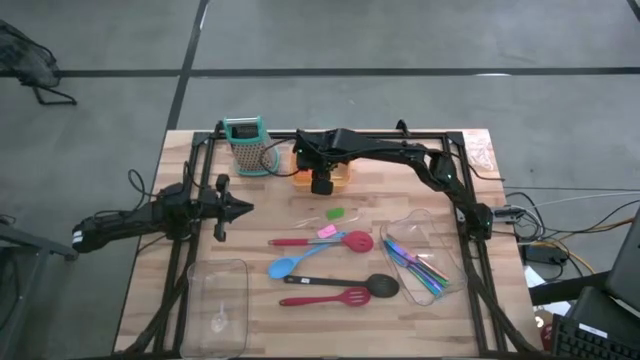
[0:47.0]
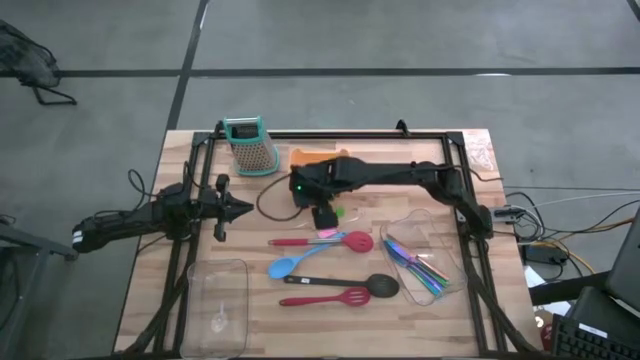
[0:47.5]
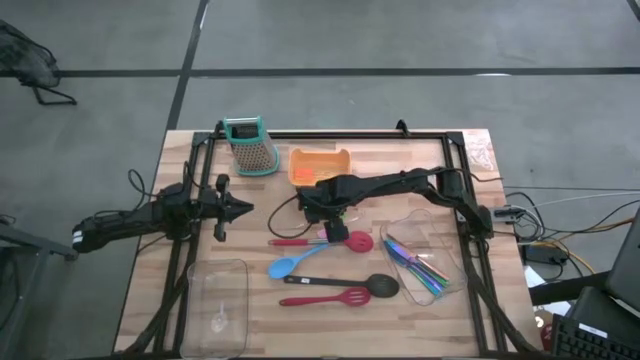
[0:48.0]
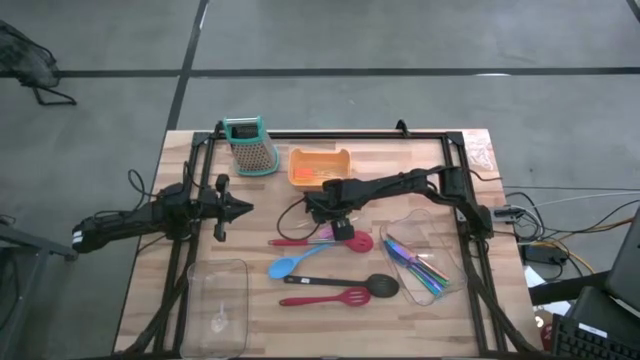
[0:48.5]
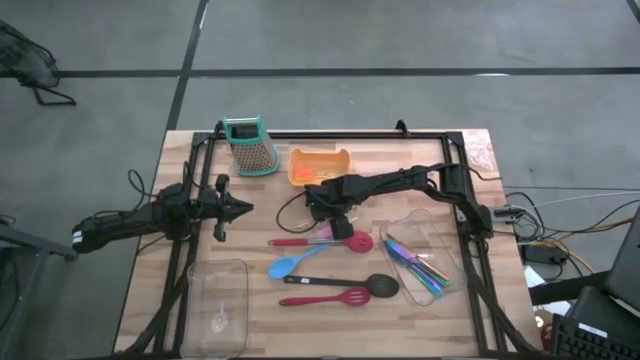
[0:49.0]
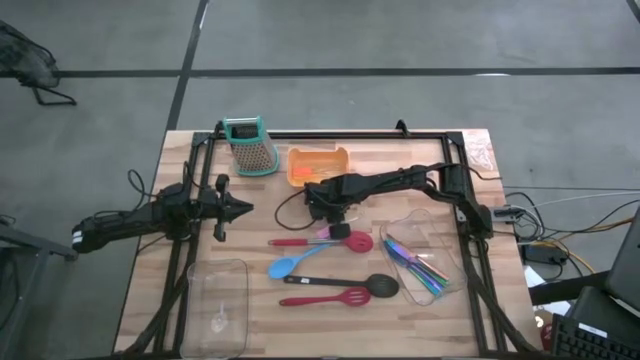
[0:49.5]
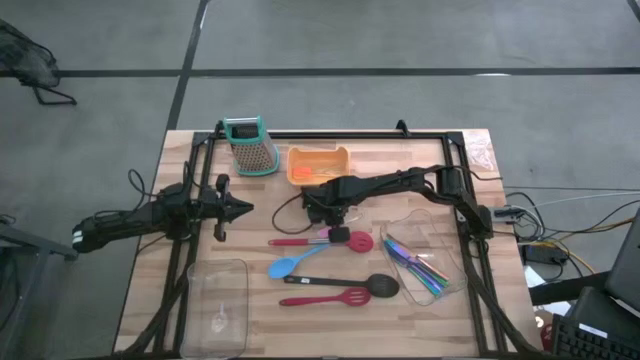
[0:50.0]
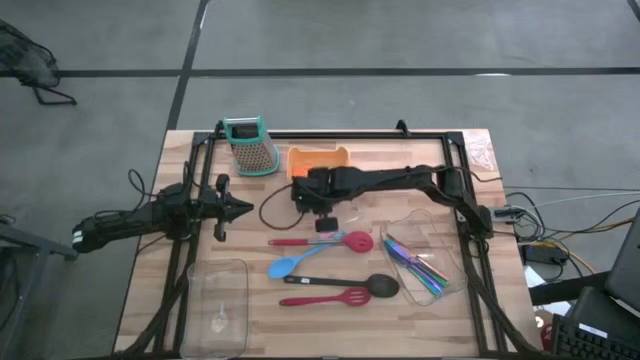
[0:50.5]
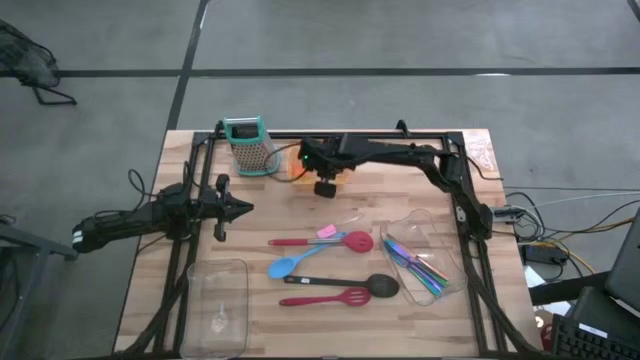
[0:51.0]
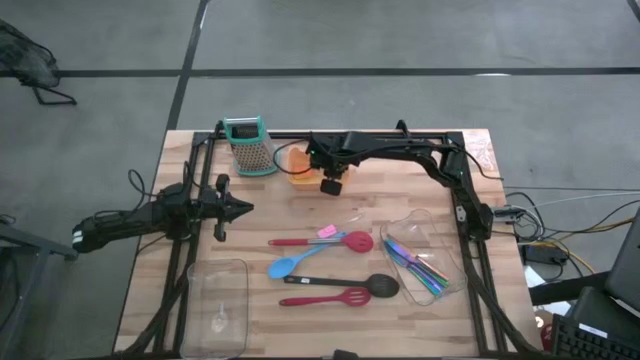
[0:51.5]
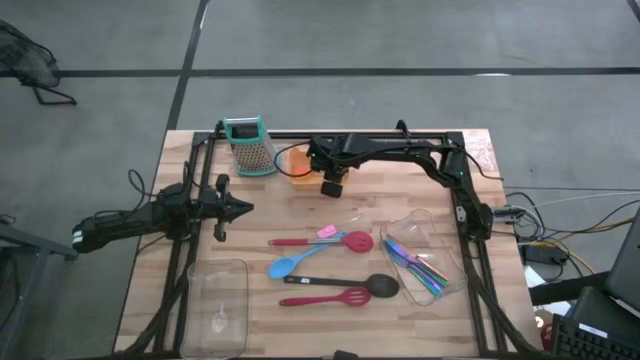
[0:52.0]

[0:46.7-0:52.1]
Task: Pick & Place Kitchen Items
Put the green spatula into the yellow bin

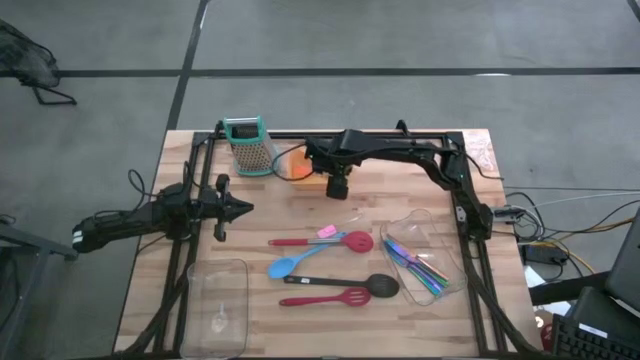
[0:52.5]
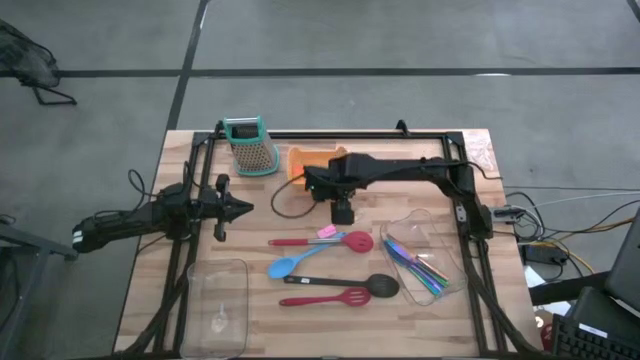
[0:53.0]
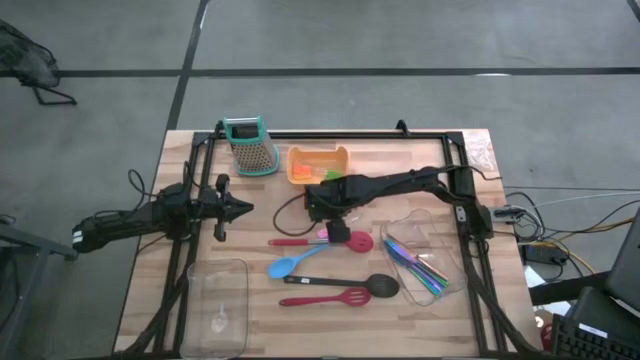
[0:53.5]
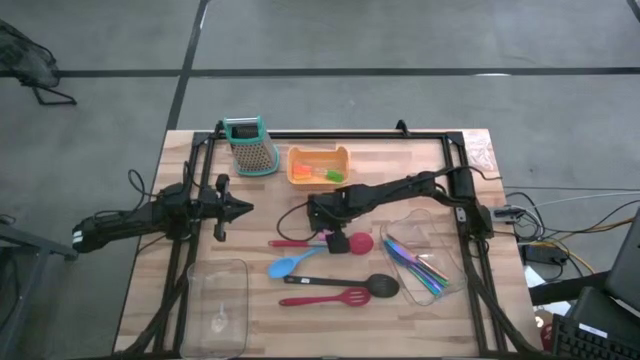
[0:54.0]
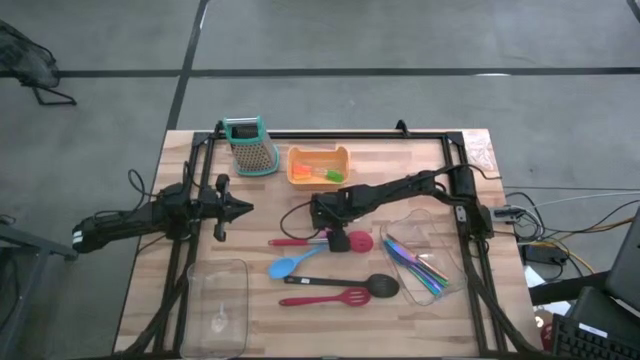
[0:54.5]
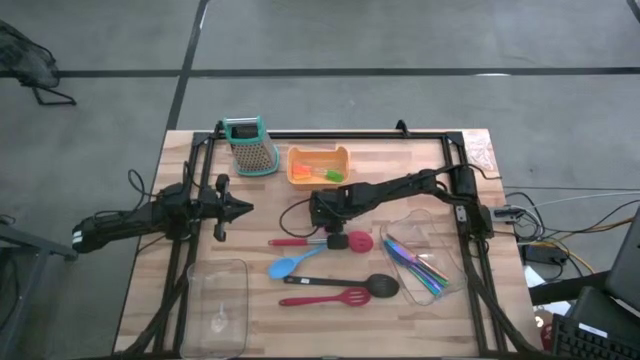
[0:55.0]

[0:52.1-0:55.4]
Put the pink spatula into the yellow bin

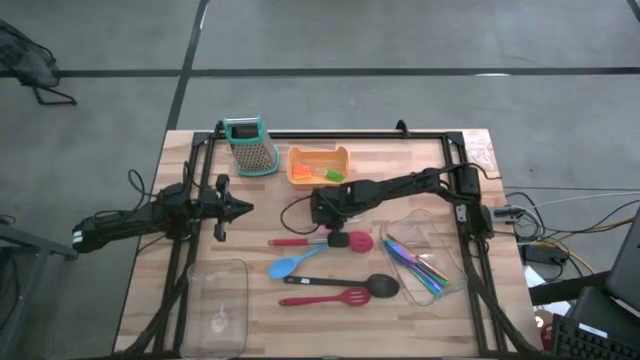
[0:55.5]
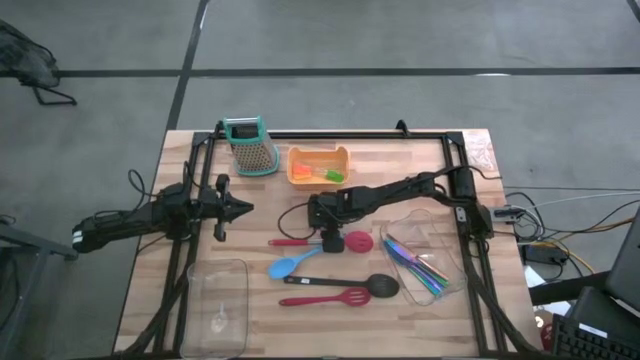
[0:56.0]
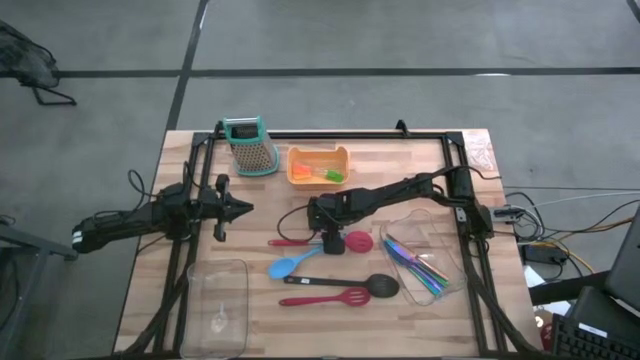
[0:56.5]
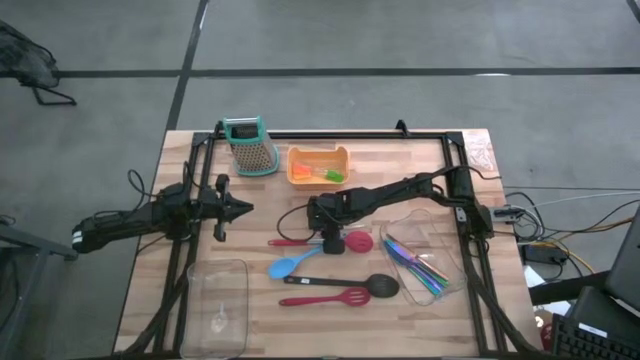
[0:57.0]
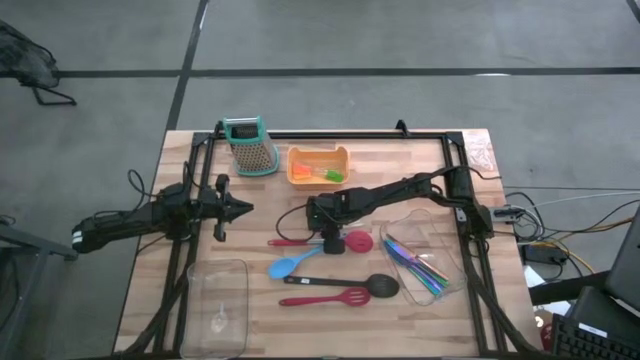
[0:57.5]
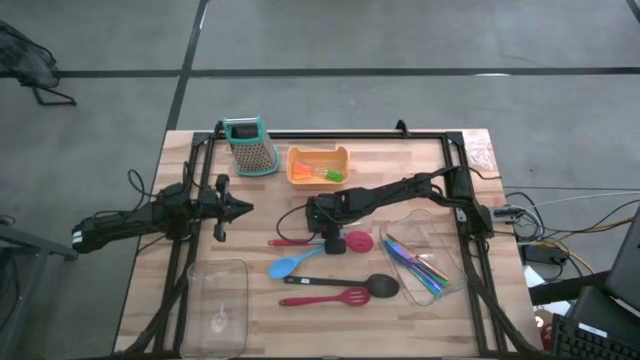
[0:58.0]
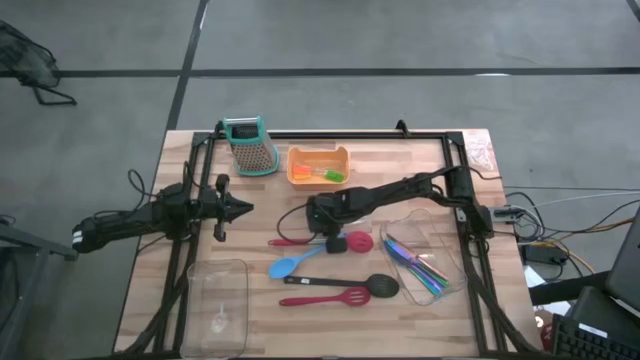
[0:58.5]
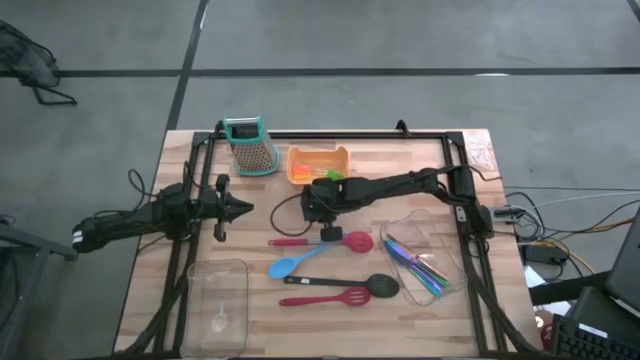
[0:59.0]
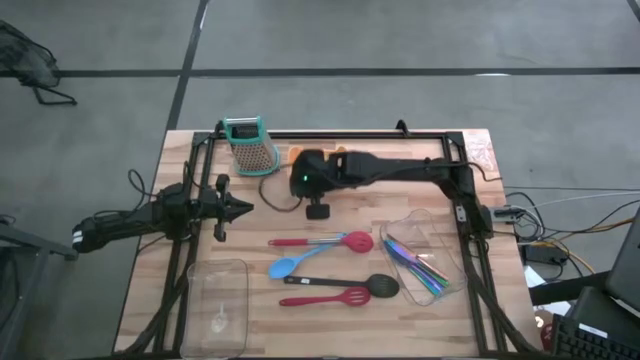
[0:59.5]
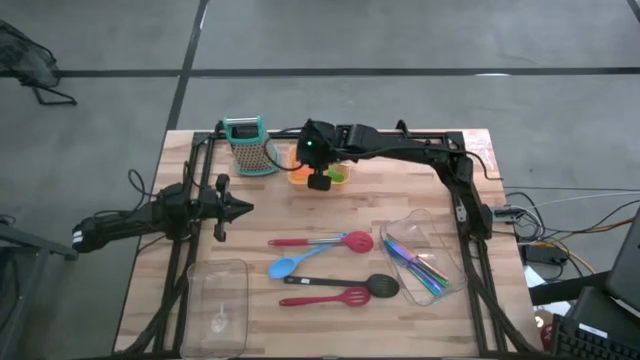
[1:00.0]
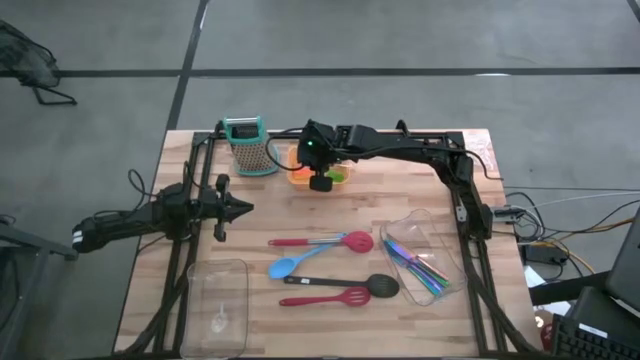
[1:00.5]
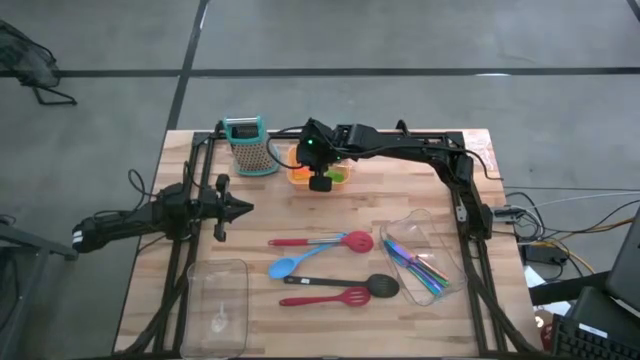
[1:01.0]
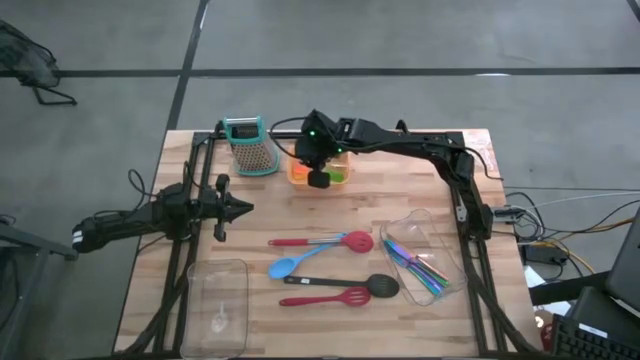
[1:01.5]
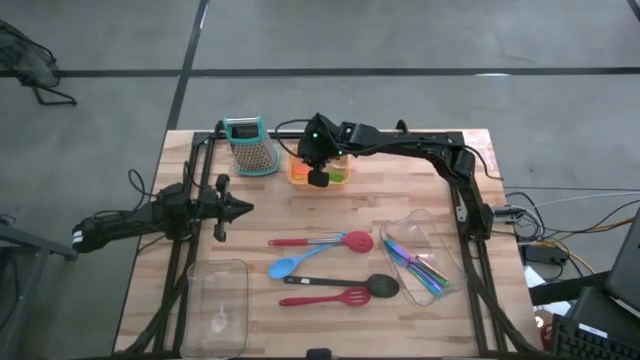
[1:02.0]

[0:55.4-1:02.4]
Put the pink spatula into the yellow bin

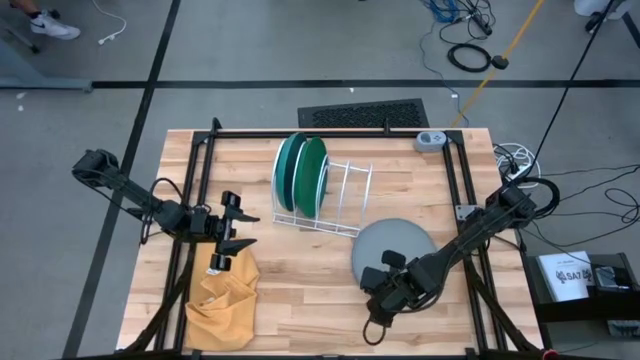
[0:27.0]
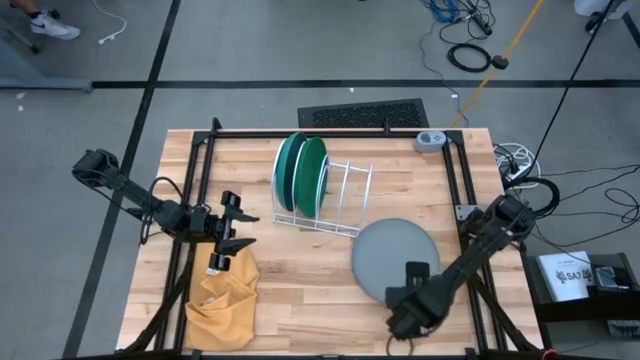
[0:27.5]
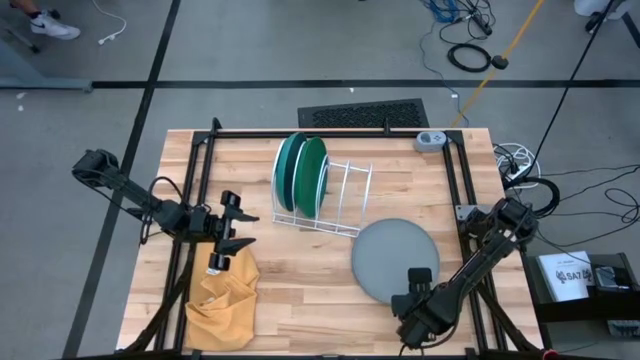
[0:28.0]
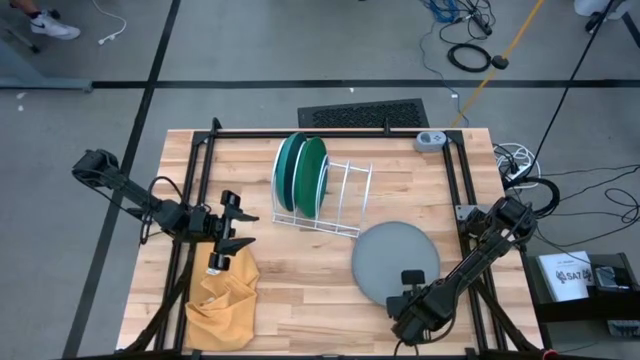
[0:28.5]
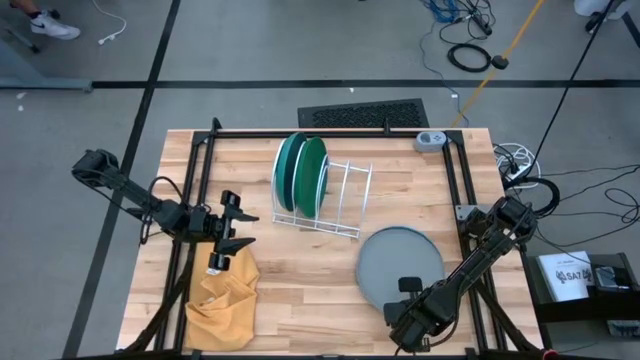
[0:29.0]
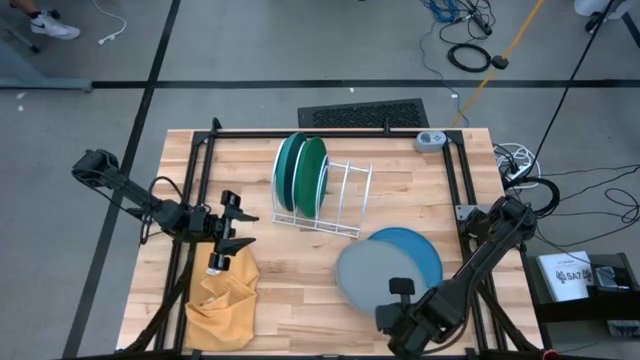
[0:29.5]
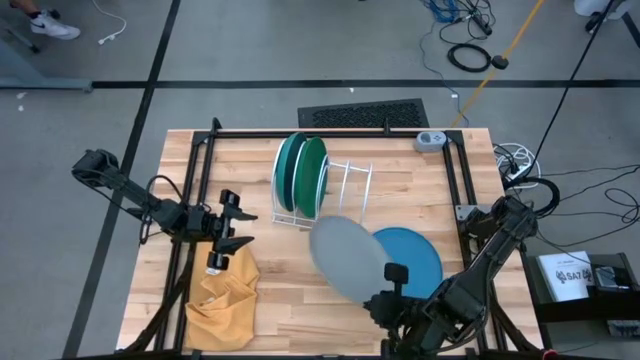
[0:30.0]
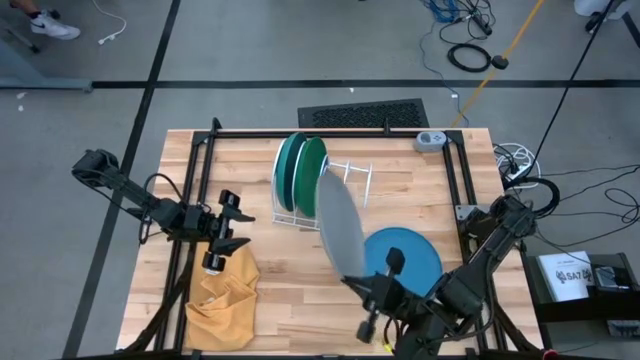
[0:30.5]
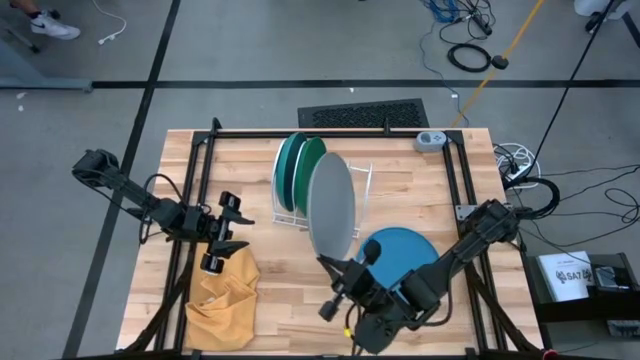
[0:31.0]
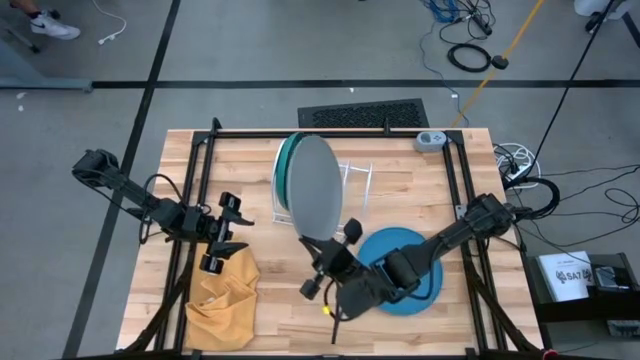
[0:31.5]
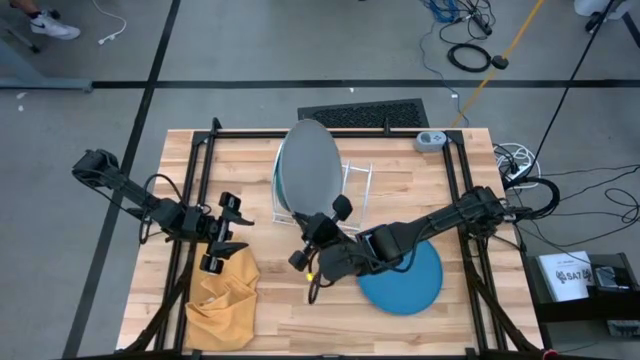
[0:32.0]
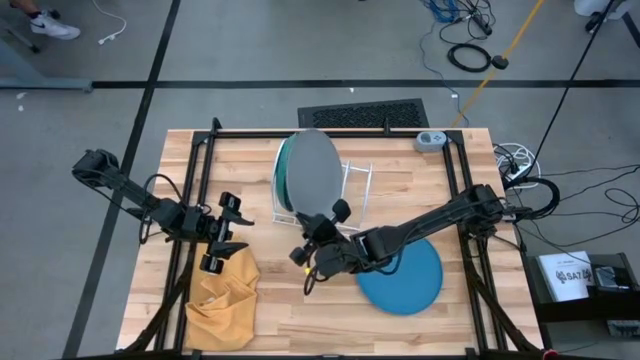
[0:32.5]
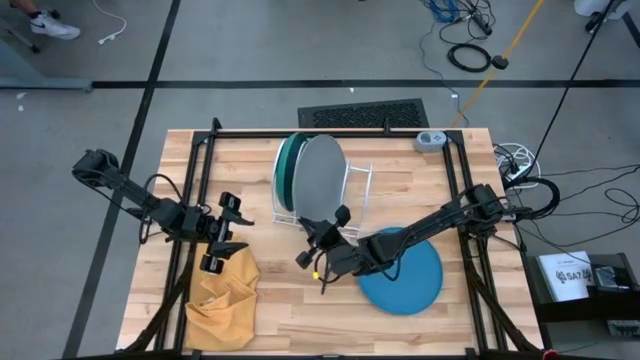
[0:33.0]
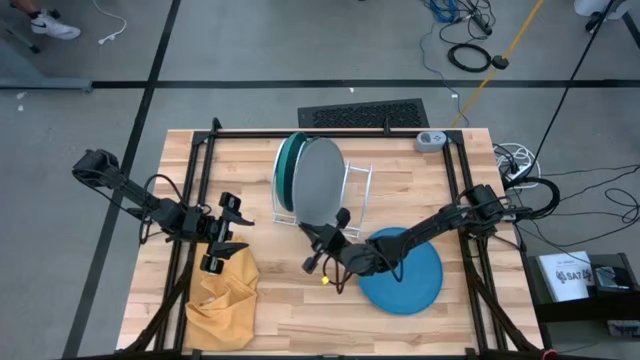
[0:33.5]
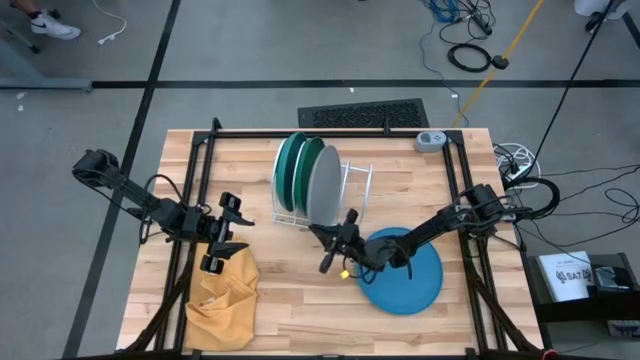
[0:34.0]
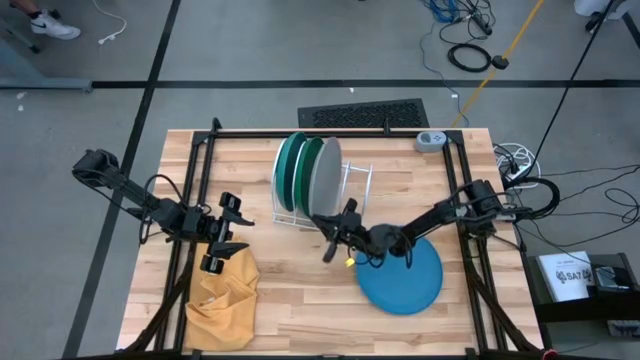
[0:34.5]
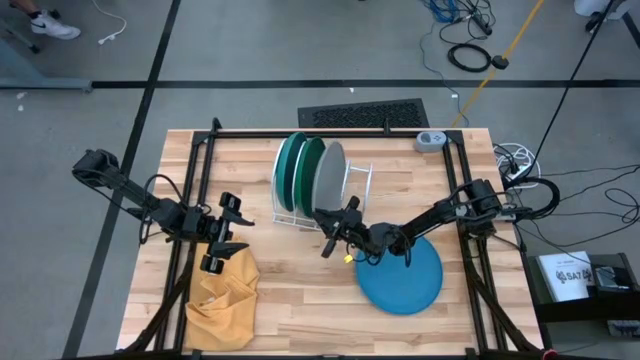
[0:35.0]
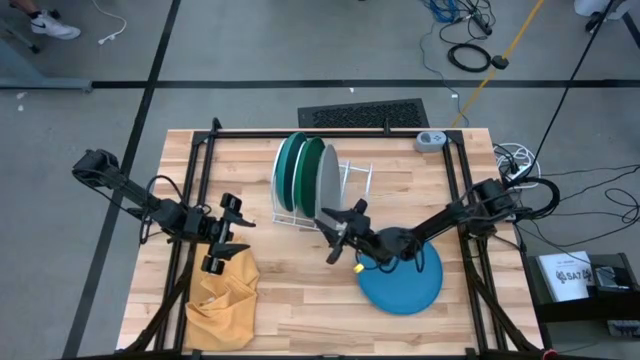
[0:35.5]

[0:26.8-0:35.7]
Task: Sort dishes
Put the gray plate in the white dish rack
